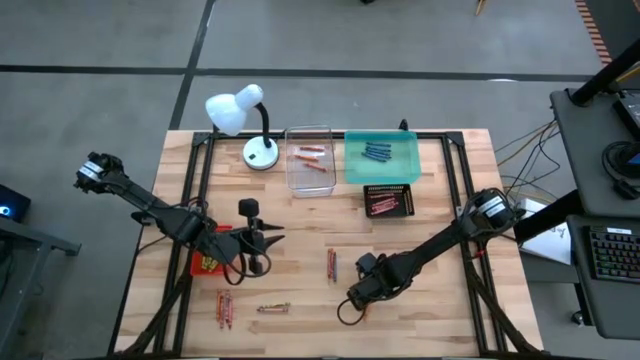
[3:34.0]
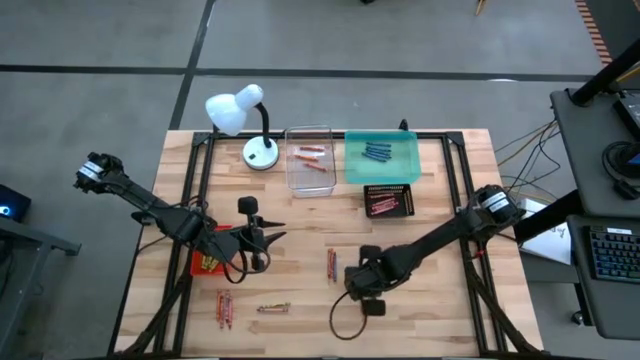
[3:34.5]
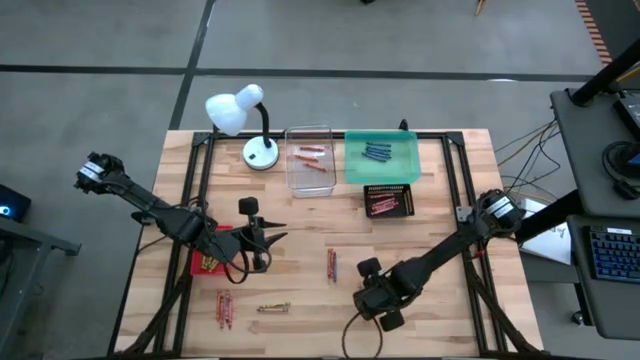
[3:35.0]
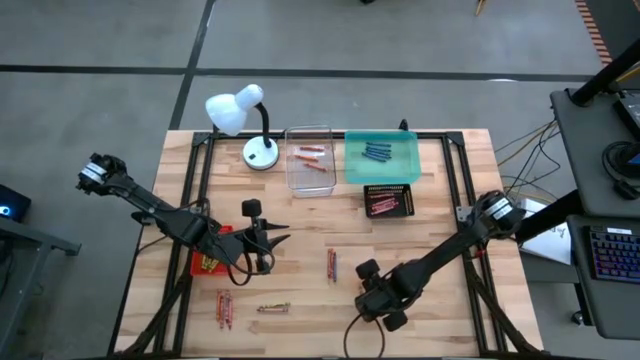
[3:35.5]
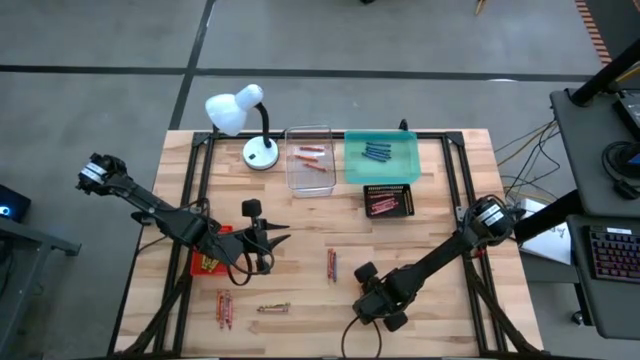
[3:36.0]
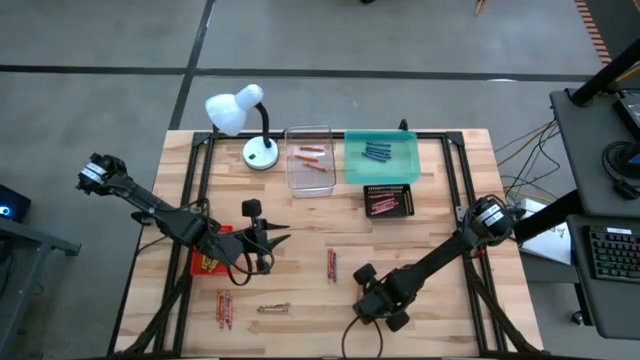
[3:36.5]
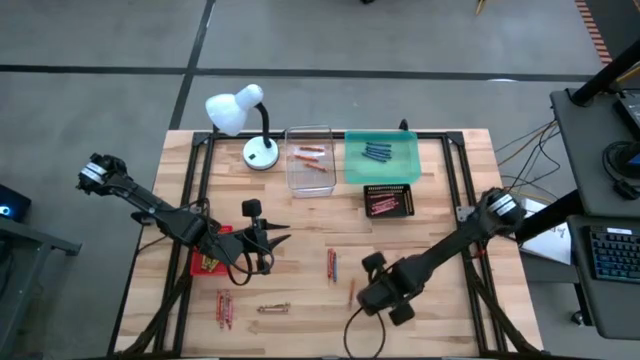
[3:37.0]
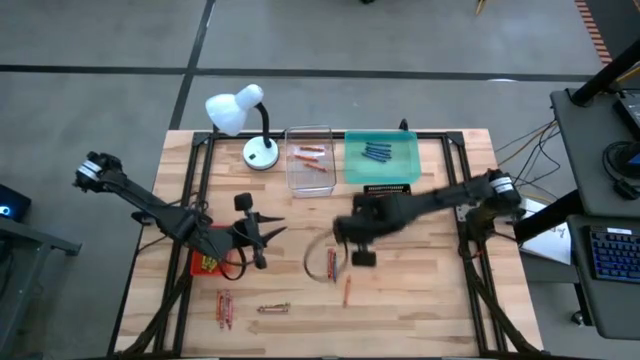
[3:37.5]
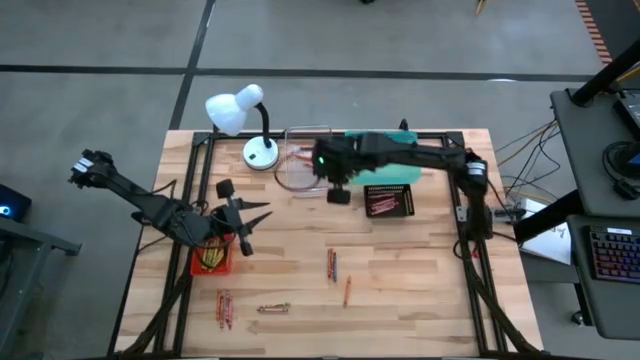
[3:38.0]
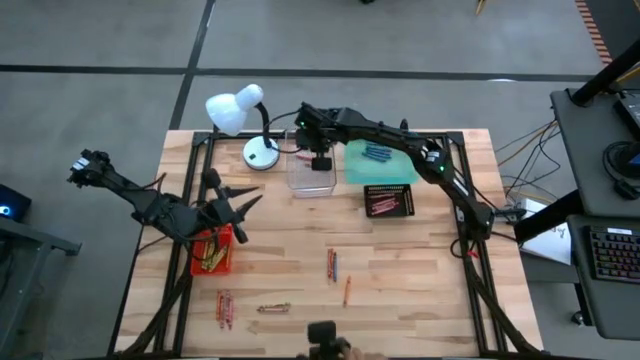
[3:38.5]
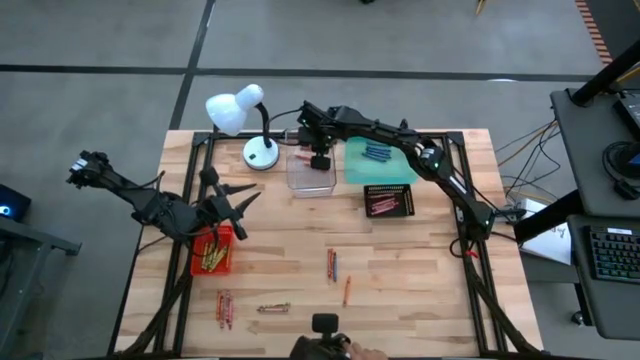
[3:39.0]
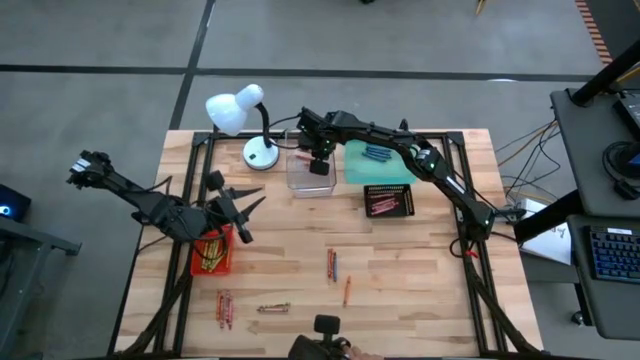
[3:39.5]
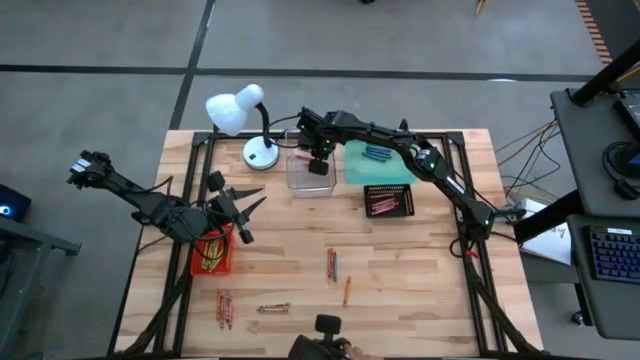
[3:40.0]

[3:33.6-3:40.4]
Task: Sort crayons
Put the orange bin into the transparent bin

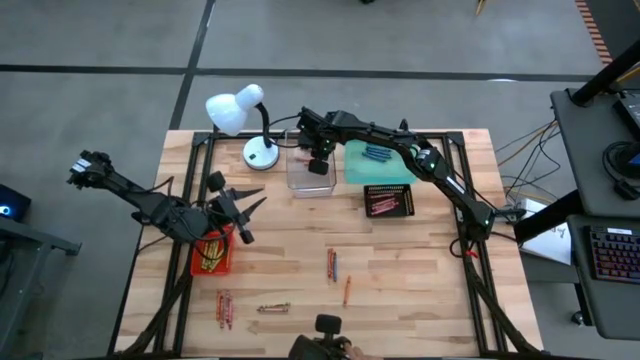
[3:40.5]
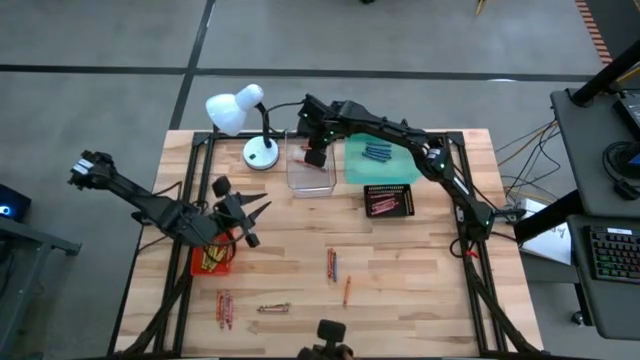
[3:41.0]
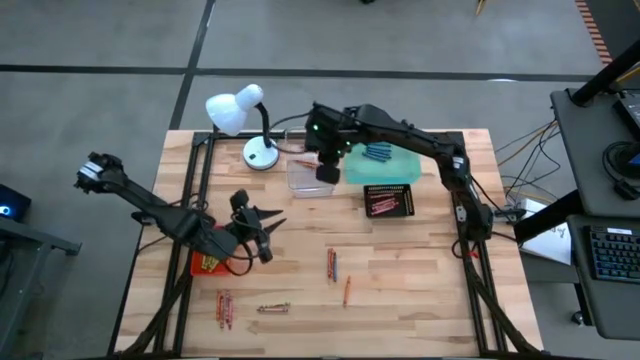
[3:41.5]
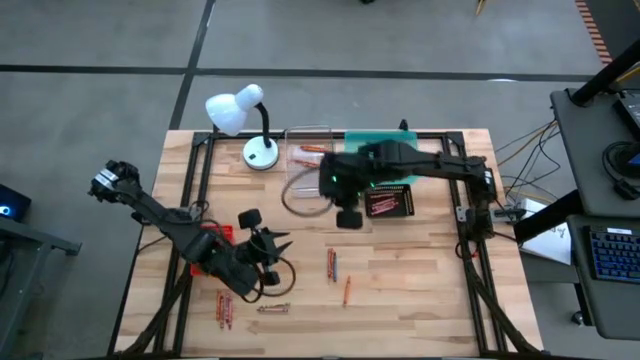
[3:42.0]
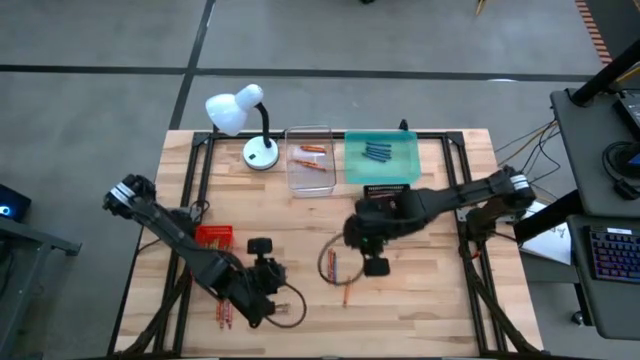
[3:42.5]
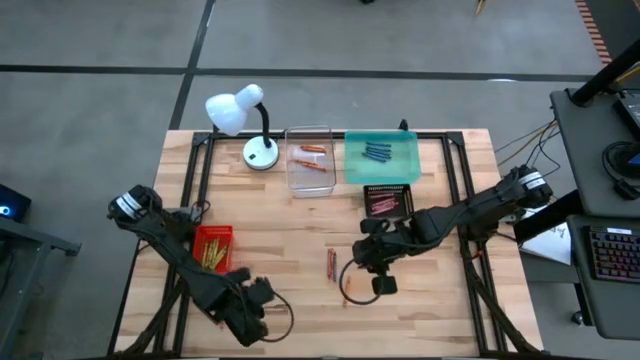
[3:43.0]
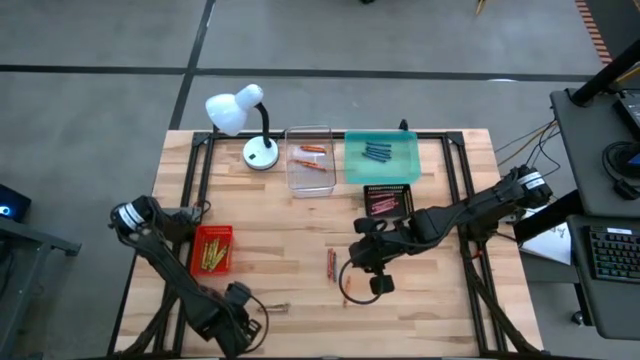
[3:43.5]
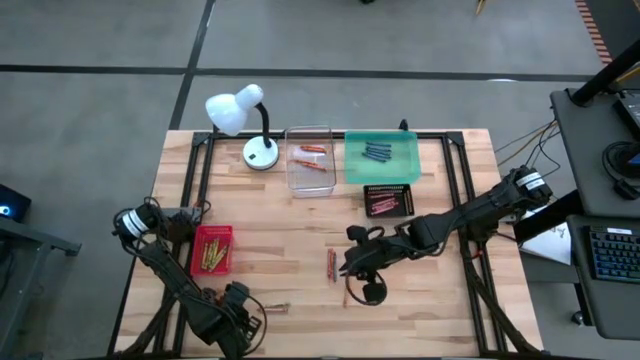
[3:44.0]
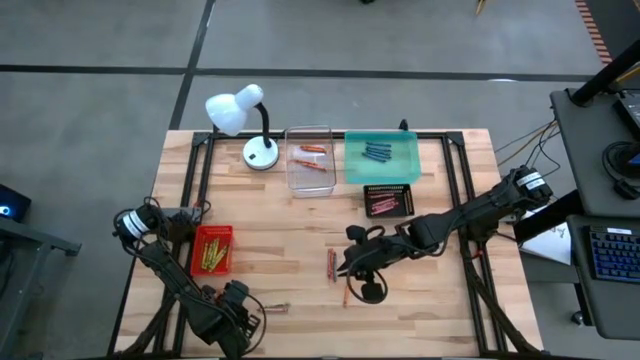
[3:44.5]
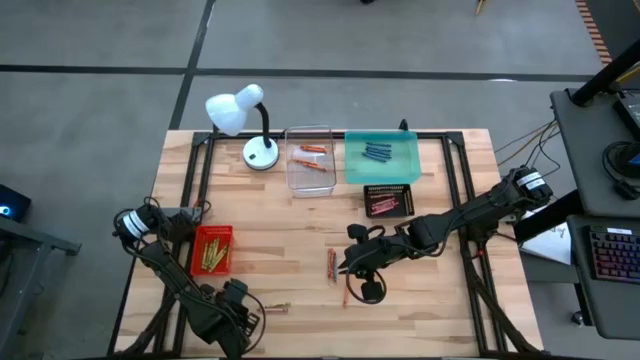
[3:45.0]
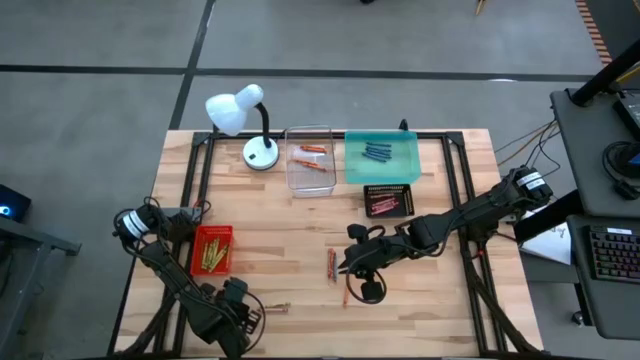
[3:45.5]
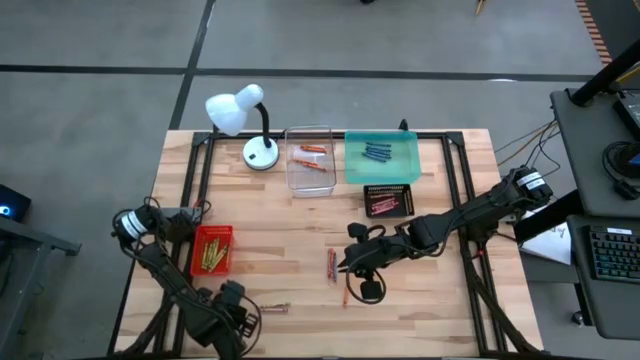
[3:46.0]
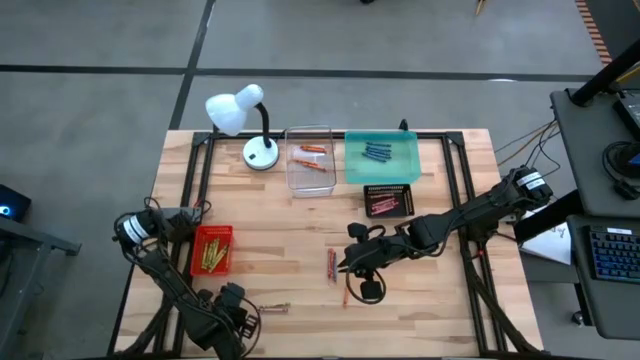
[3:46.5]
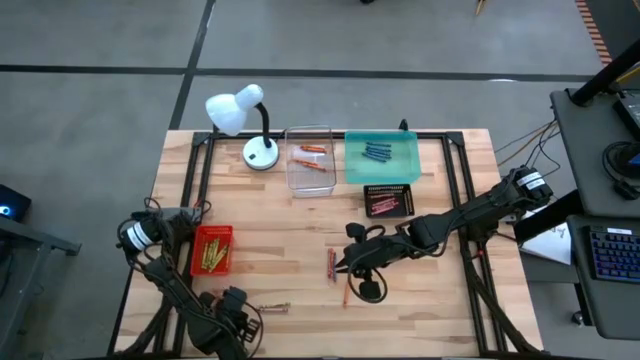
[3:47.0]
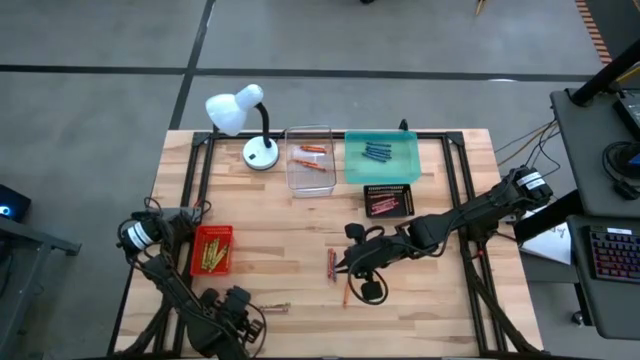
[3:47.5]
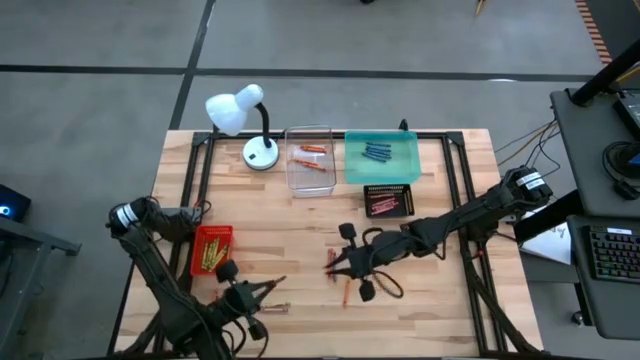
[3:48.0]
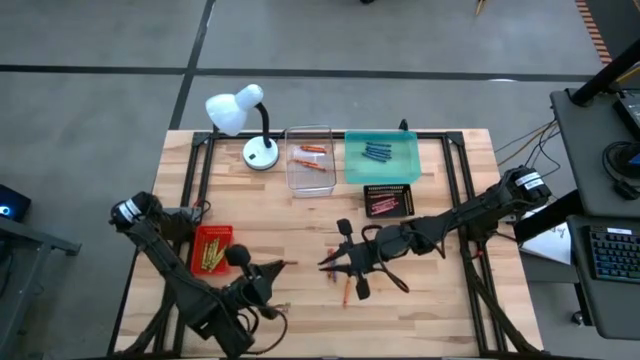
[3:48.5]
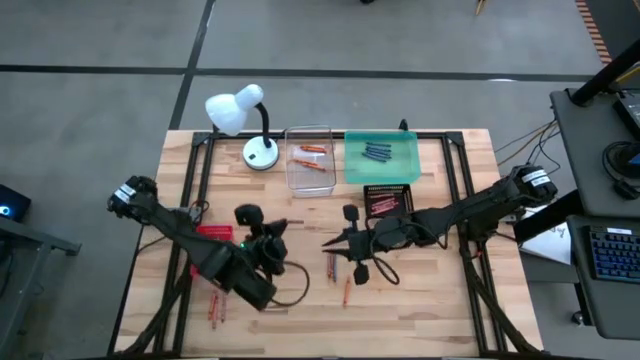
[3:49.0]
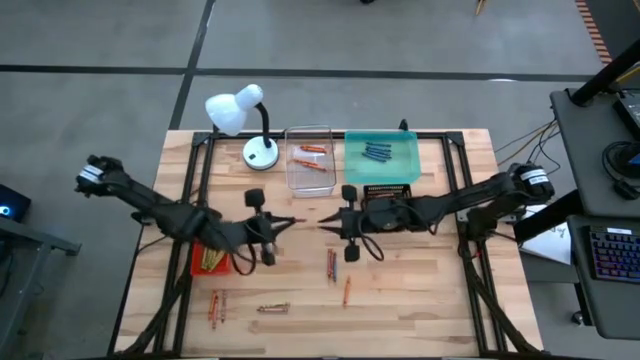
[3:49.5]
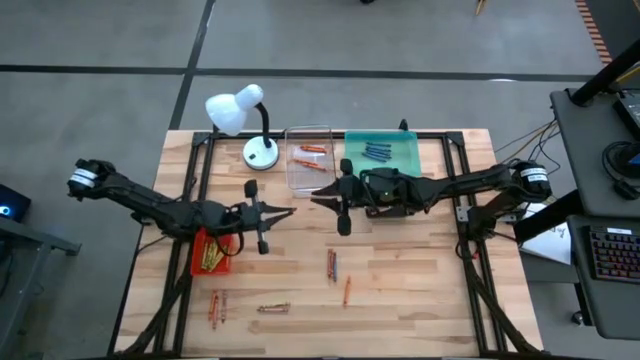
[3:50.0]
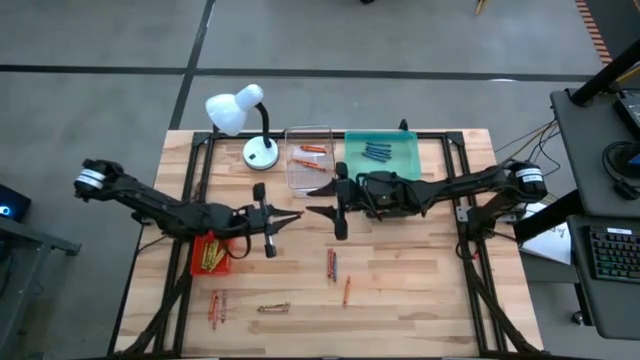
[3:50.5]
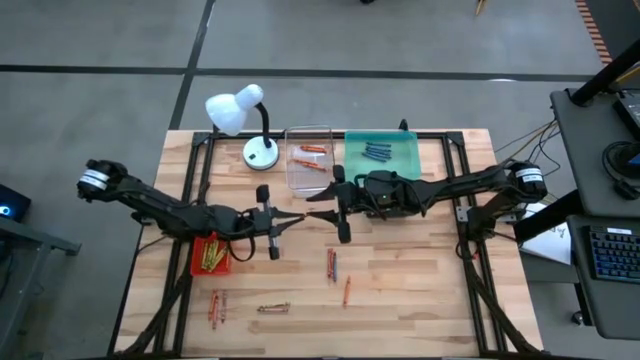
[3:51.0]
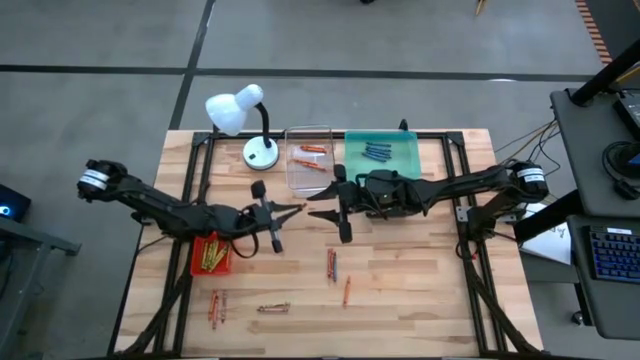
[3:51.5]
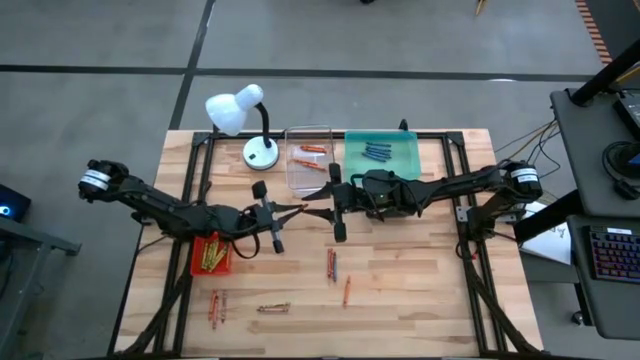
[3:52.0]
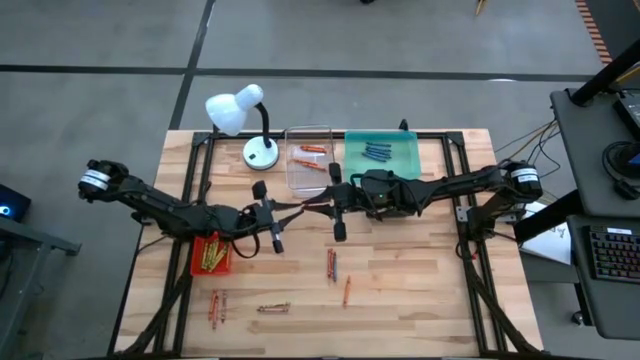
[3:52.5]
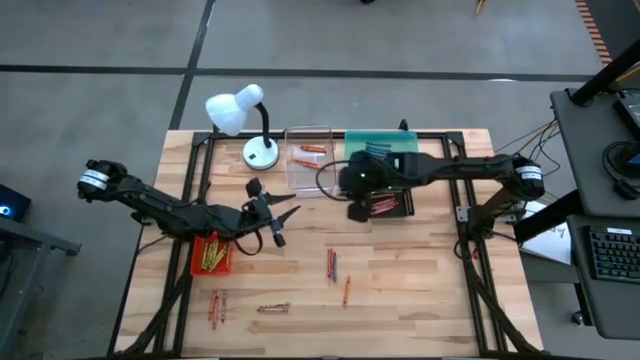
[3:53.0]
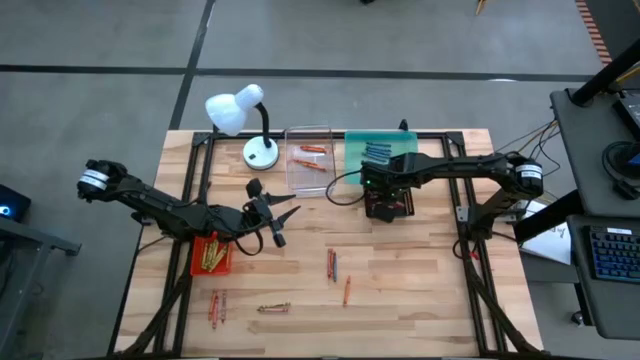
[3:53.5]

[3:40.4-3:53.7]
Put the red crayon into the black bin

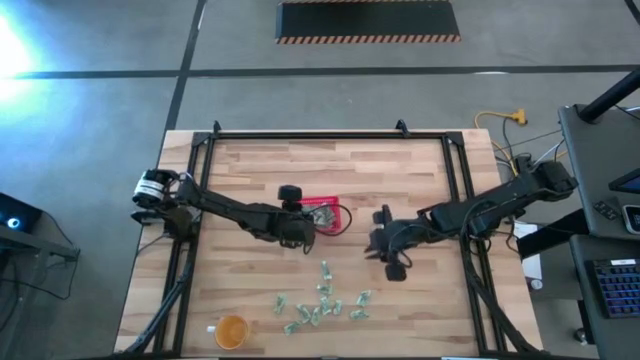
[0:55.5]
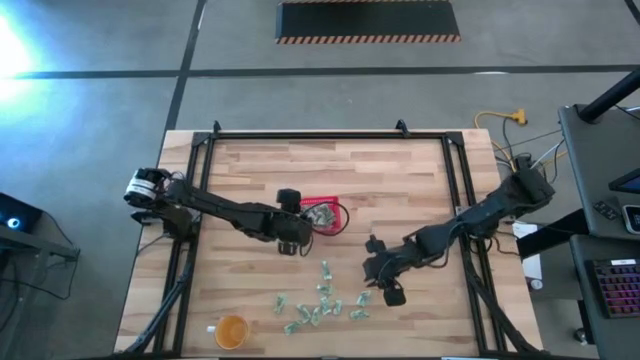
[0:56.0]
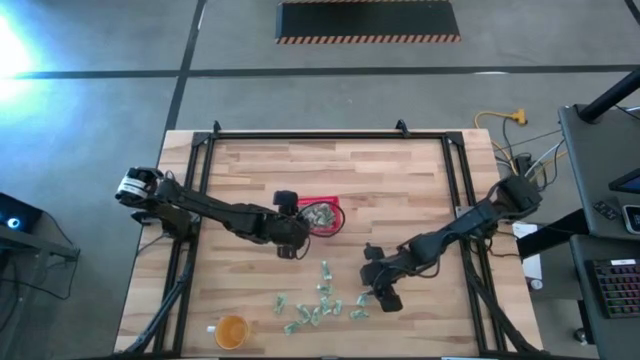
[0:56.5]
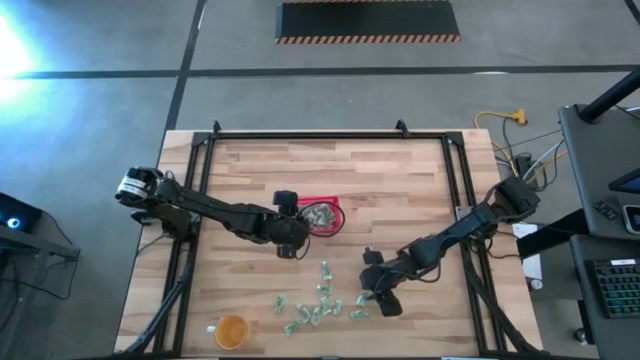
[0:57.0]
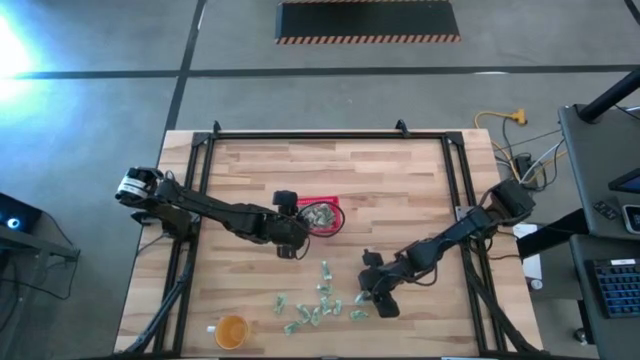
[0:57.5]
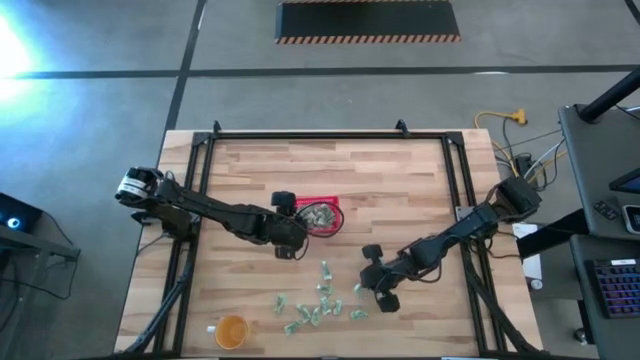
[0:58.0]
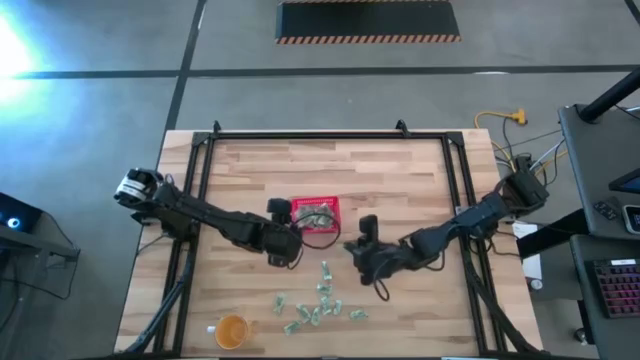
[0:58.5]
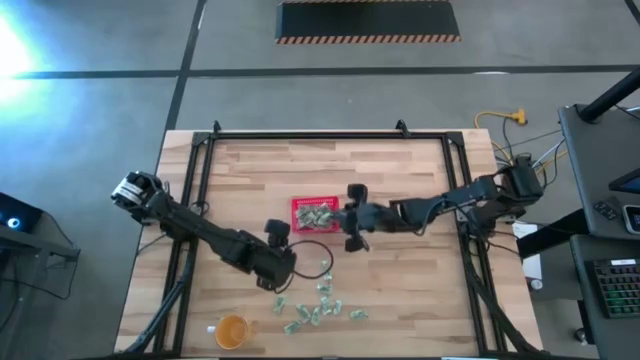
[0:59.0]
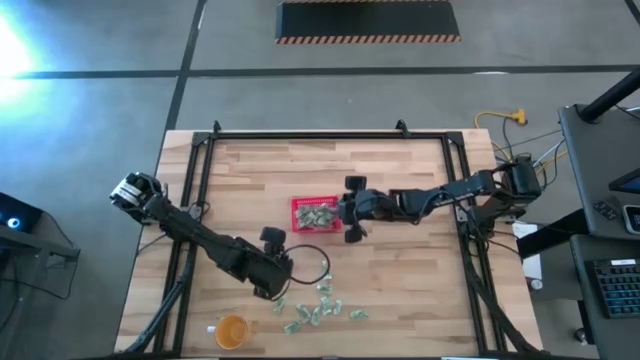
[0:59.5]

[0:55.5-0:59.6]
Task: Pick and place items into bin
Put the stevia packet into the red bin
